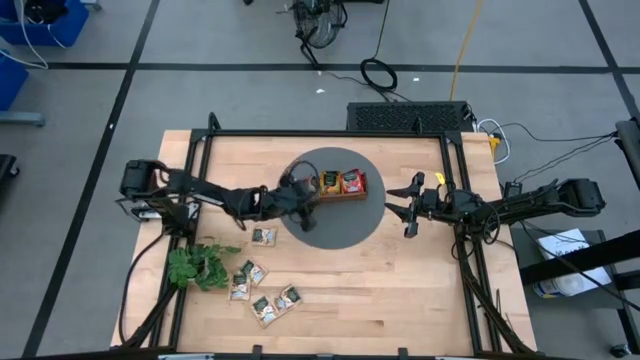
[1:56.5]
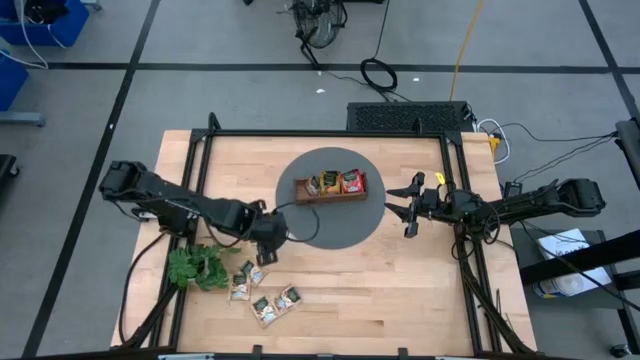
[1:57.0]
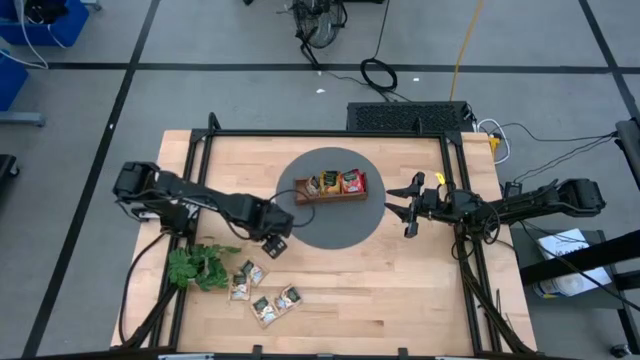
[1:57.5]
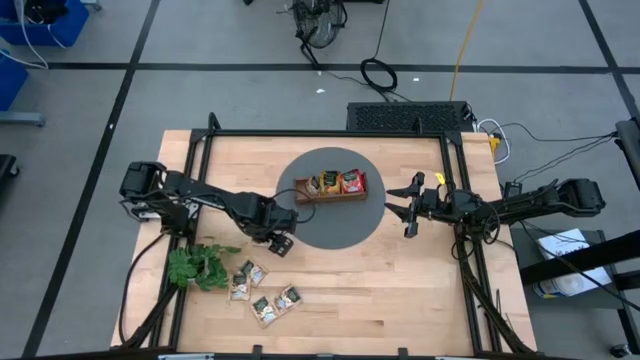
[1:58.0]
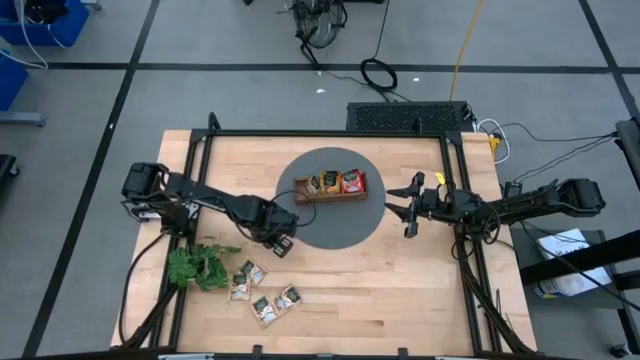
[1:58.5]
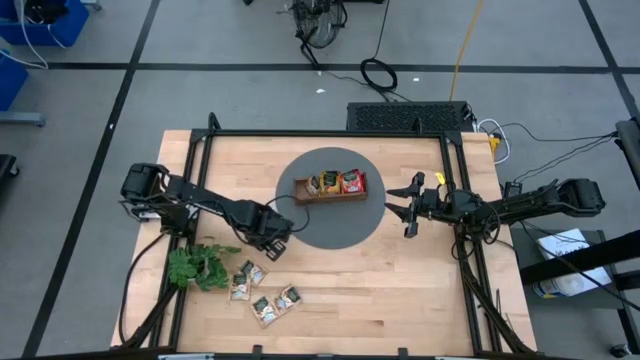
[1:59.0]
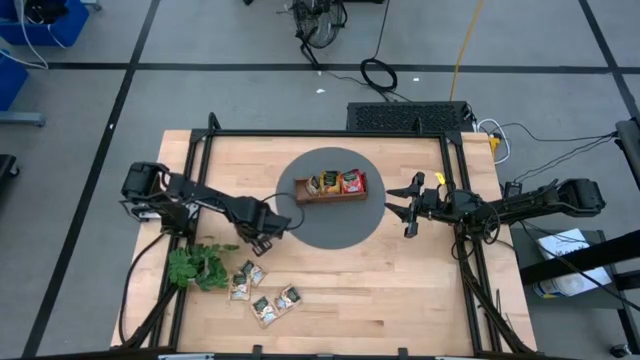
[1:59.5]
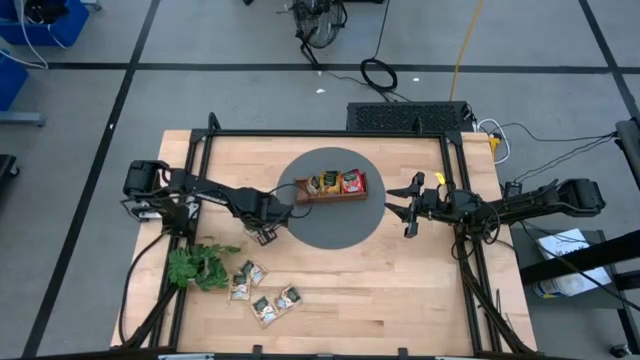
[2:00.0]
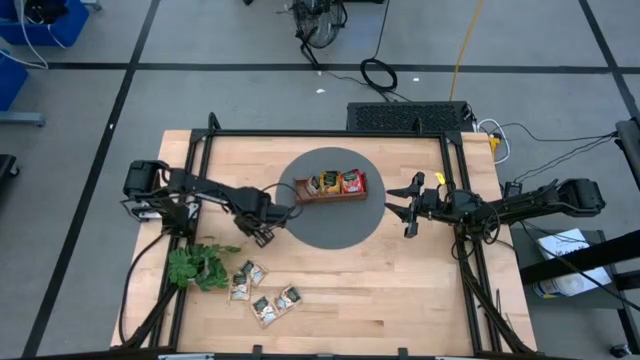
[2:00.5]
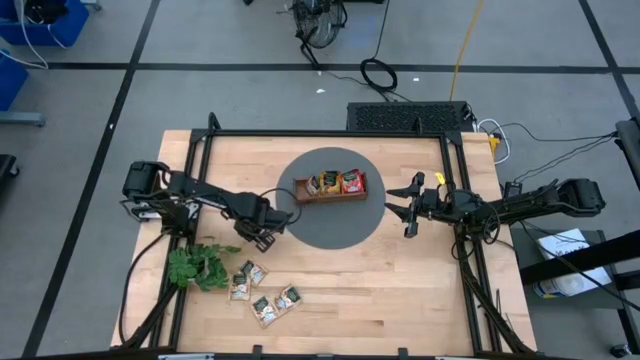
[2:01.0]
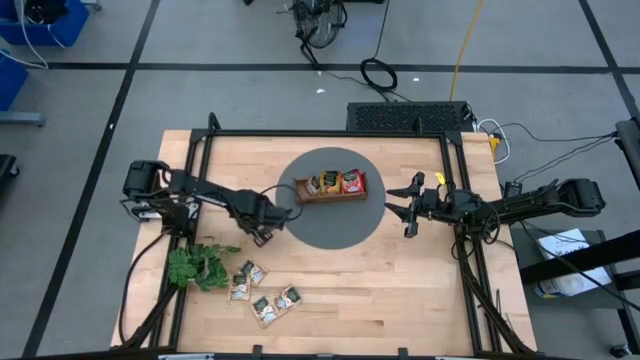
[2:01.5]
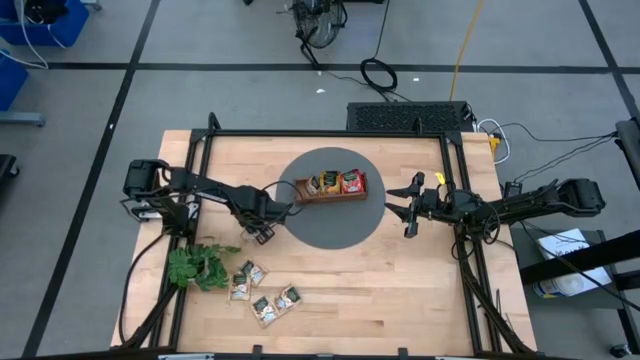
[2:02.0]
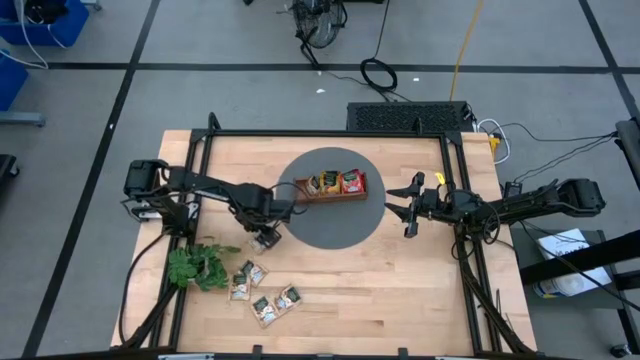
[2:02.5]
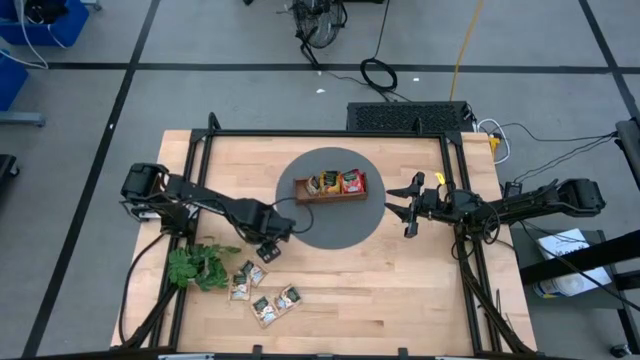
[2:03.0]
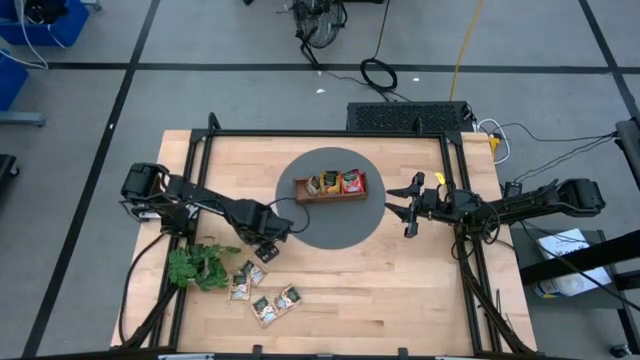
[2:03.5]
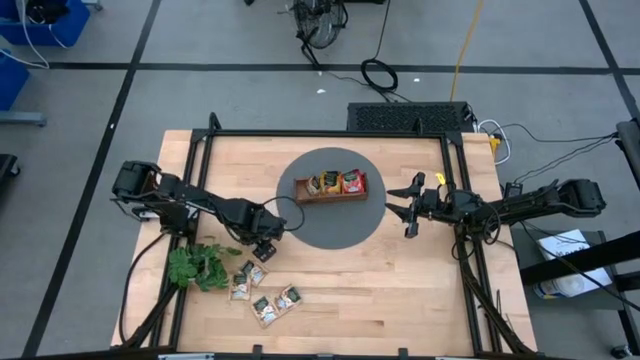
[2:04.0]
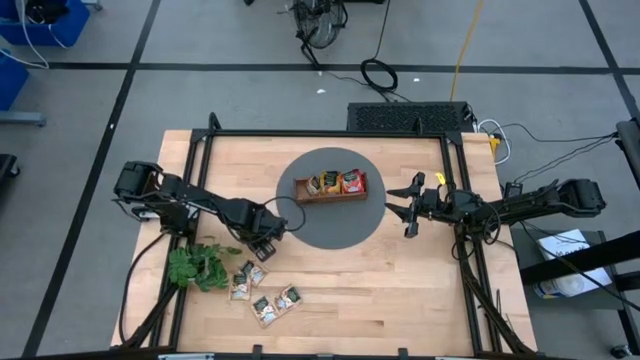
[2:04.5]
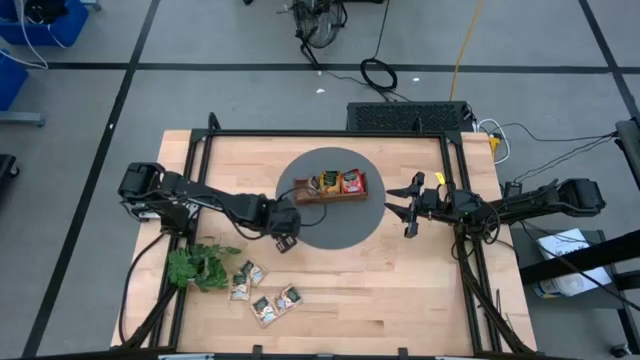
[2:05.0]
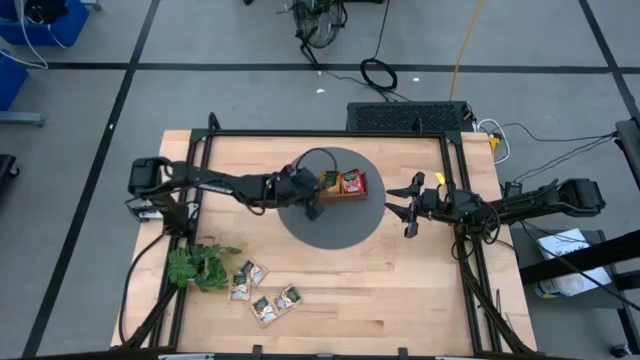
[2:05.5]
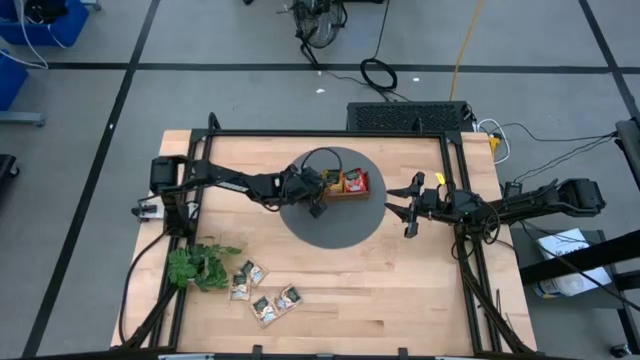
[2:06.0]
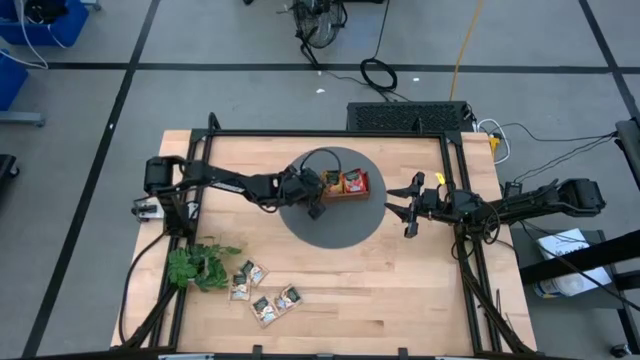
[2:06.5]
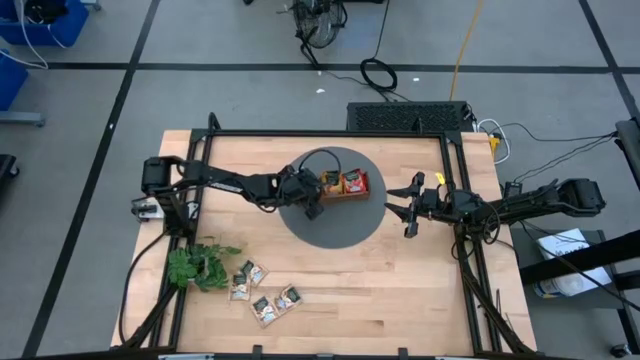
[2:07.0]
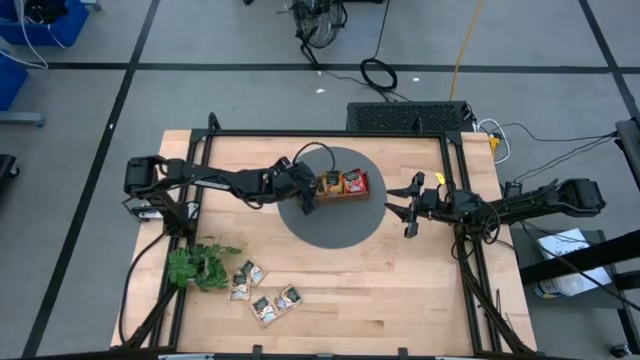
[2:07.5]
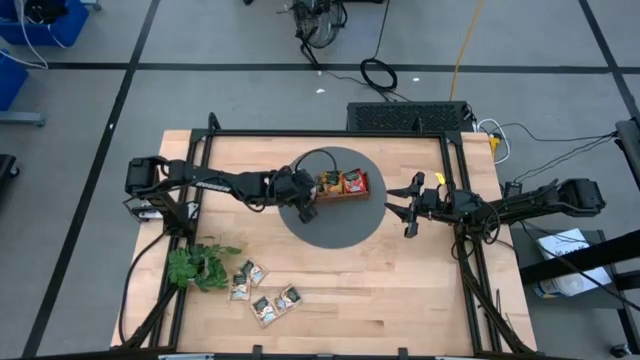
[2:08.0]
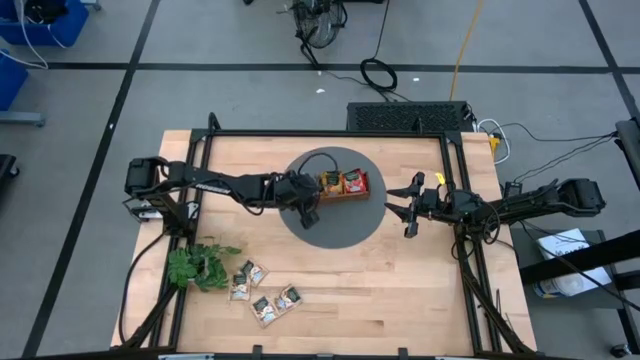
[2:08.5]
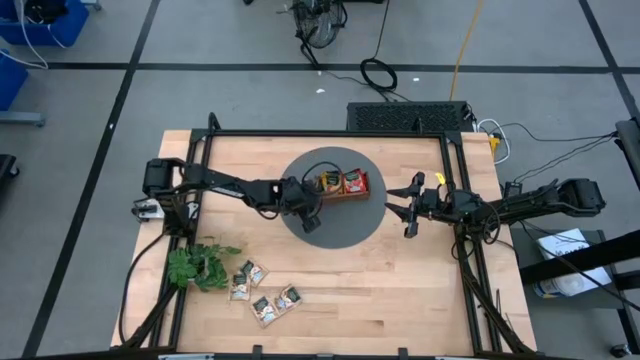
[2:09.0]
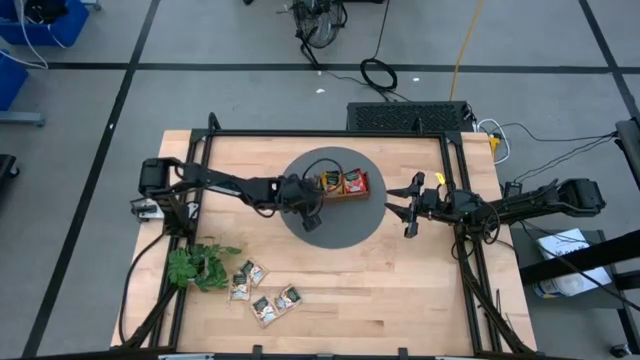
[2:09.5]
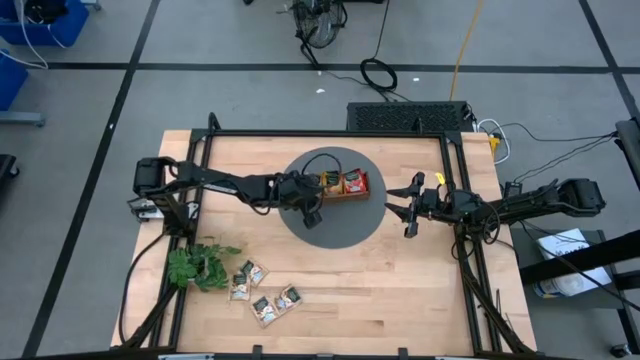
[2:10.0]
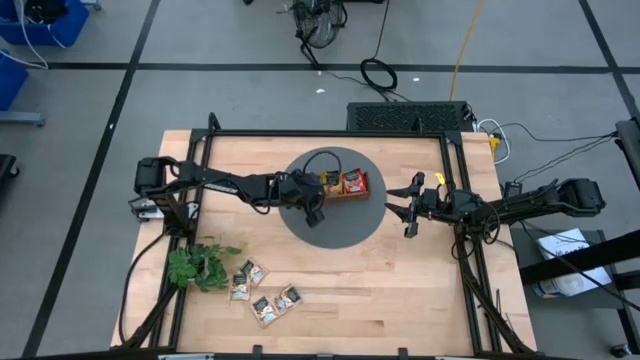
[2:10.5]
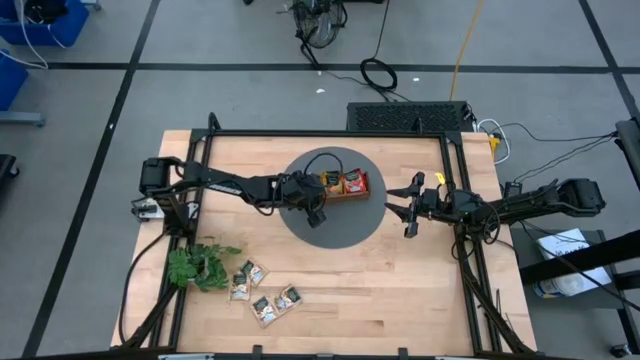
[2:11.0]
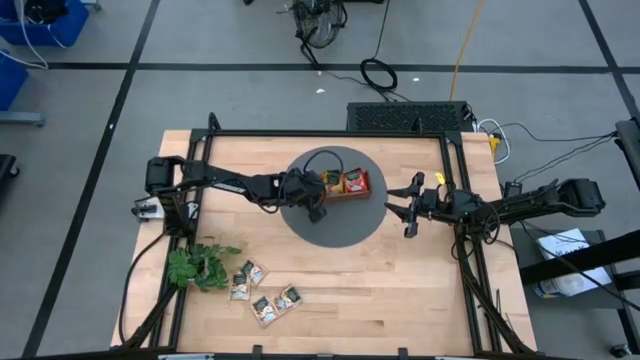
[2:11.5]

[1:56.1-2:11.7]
Task: Pick & Place Tea
Put the brown tea bag into the left section of the wooden organizer

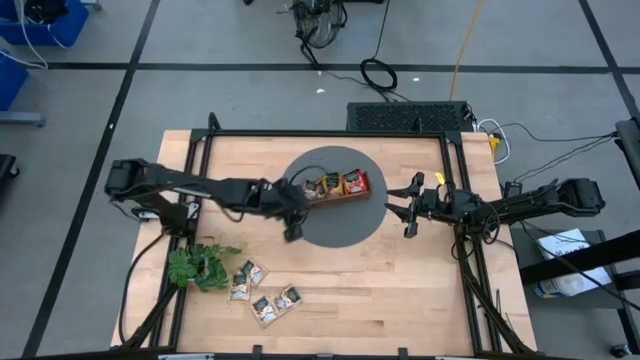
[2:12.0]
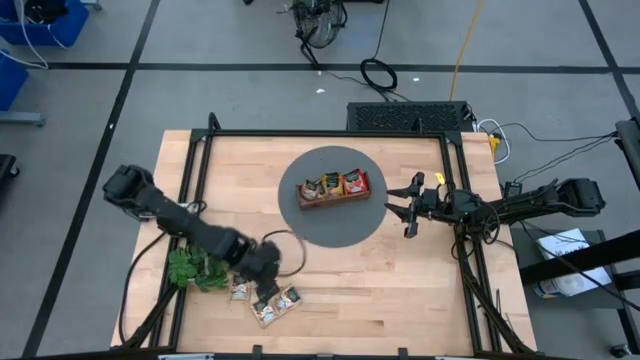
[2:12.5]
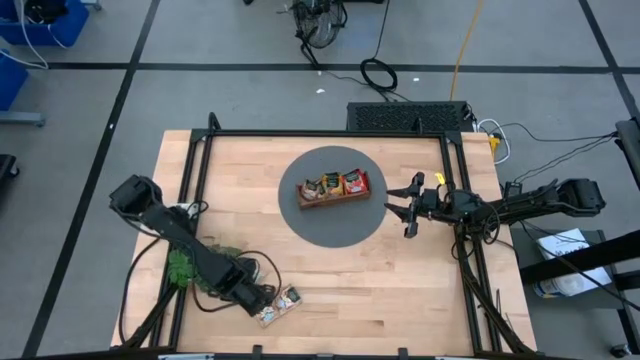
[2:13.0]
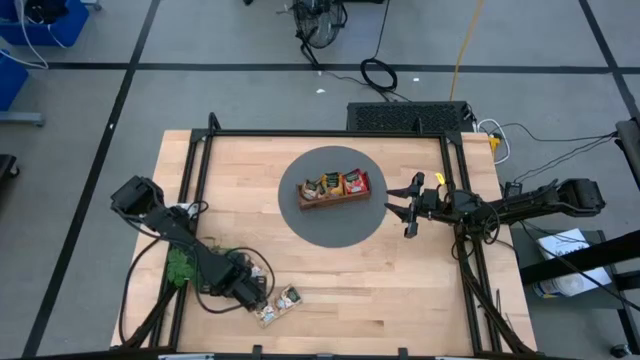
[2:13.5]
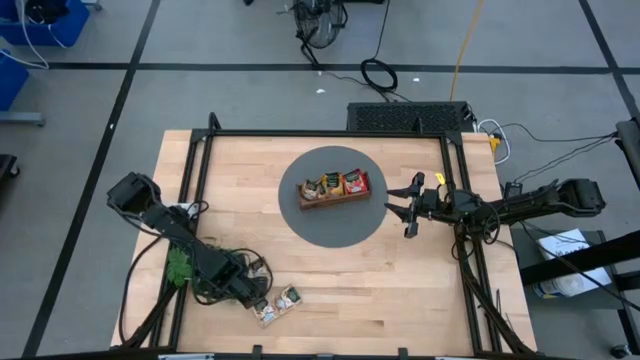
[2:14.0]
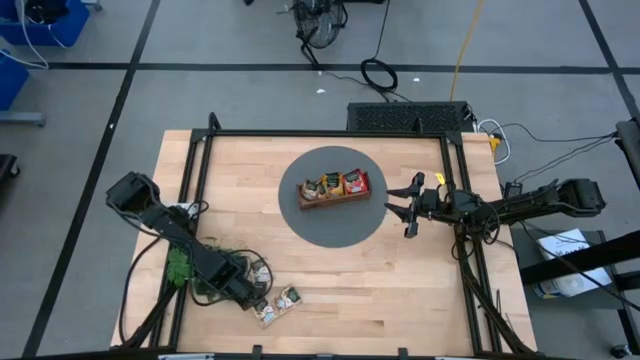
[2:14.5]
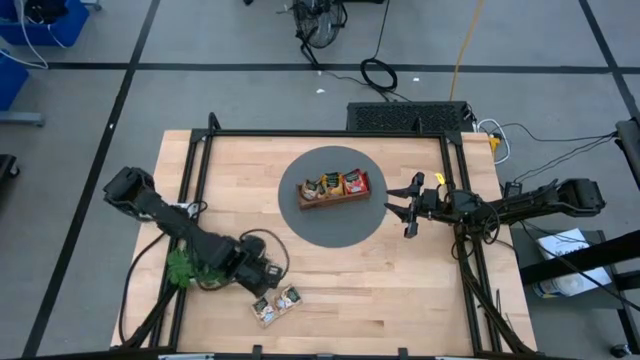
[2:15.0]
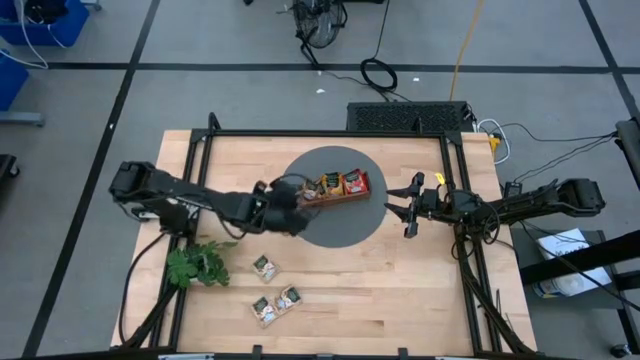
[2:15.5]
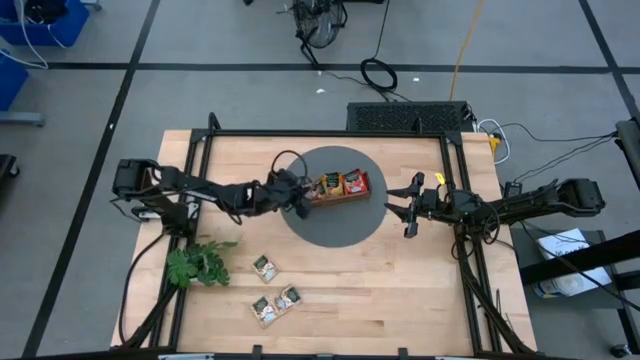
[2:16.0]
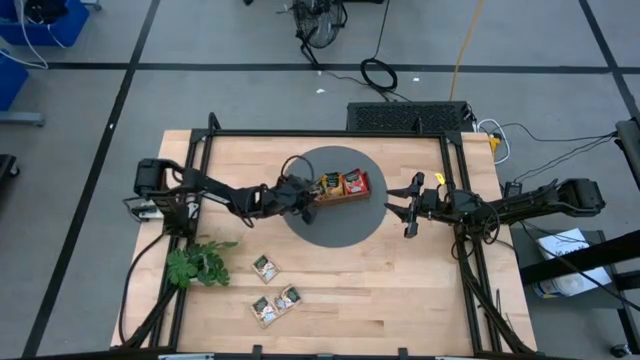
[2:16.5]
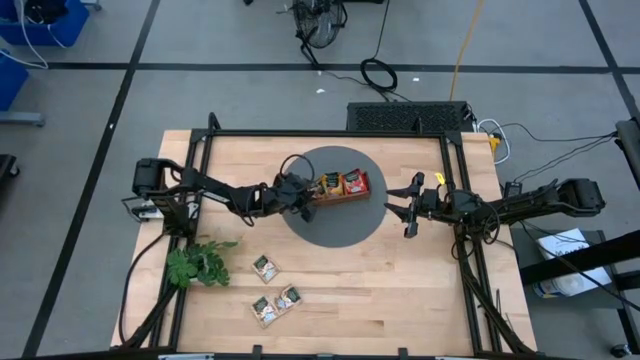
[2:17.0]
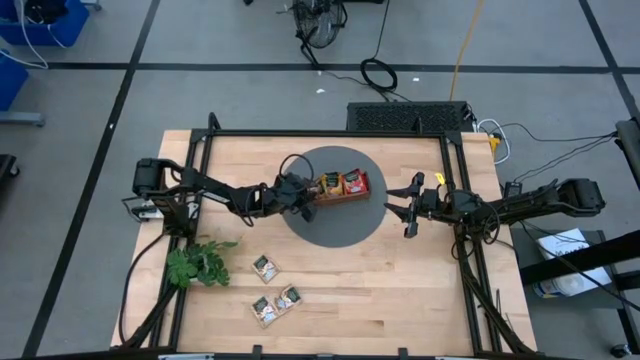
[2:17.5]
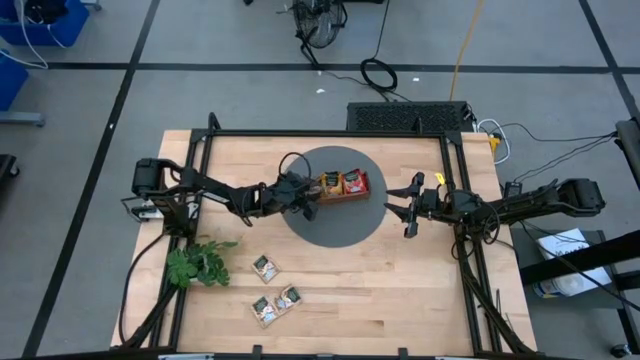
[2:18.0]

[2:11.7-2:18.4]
Put the brown tea bag into the left section of the wooden organizer
